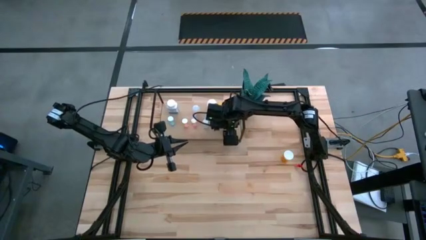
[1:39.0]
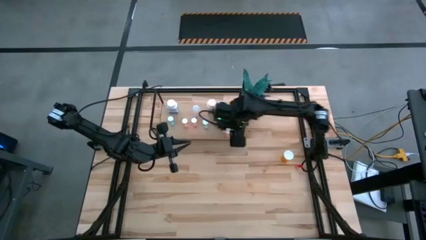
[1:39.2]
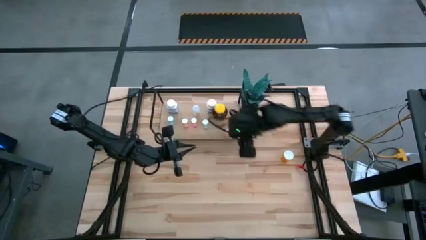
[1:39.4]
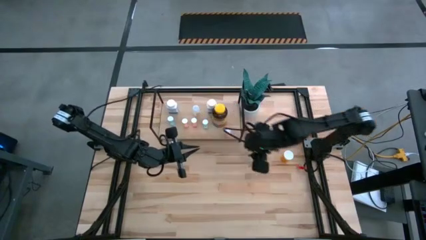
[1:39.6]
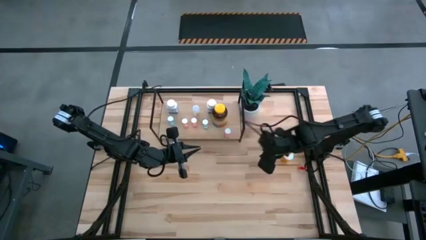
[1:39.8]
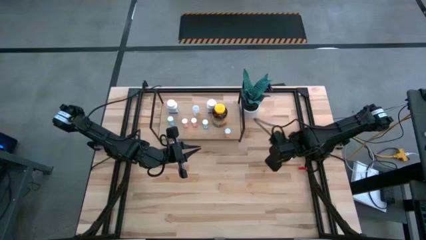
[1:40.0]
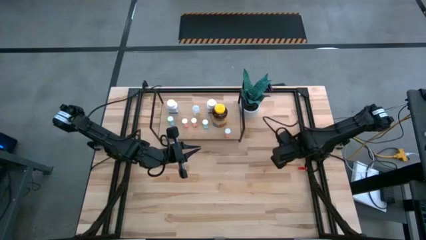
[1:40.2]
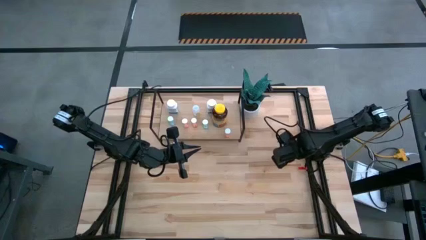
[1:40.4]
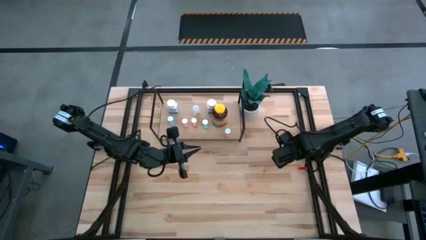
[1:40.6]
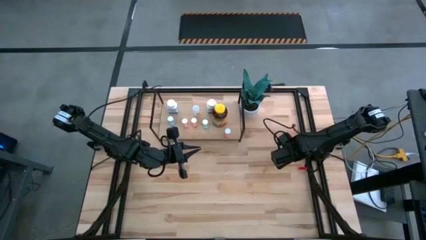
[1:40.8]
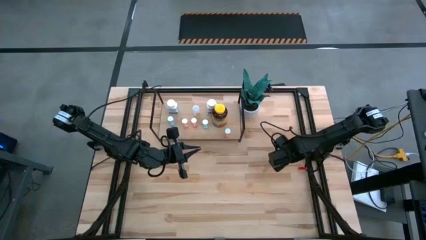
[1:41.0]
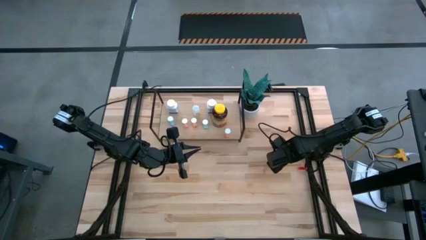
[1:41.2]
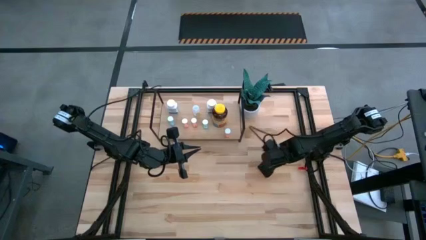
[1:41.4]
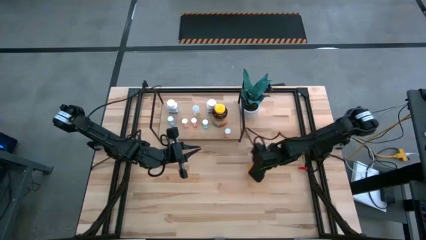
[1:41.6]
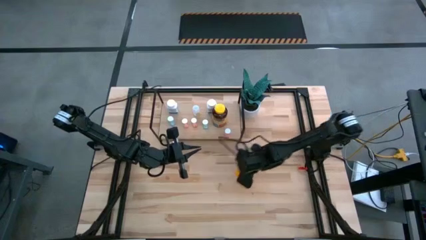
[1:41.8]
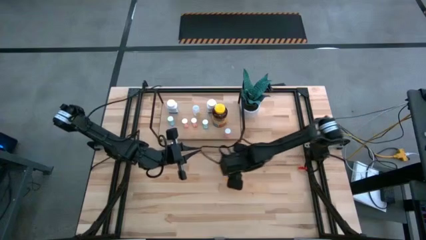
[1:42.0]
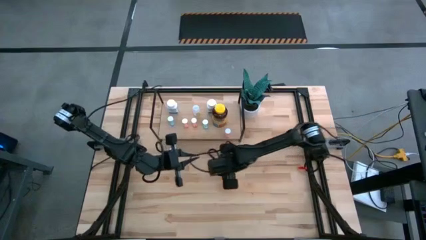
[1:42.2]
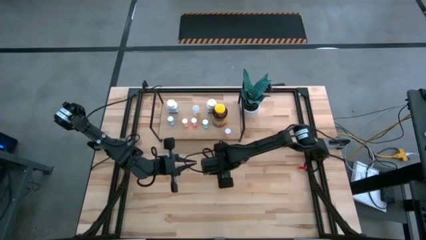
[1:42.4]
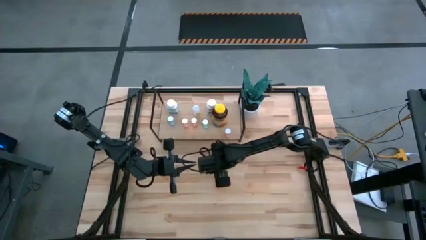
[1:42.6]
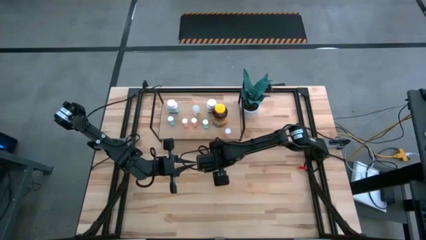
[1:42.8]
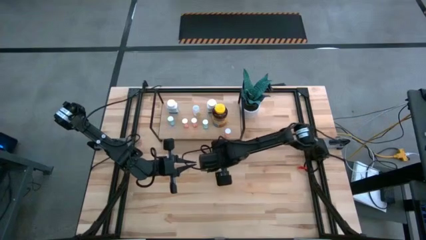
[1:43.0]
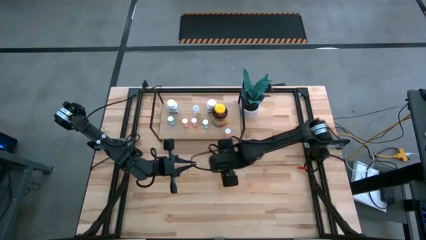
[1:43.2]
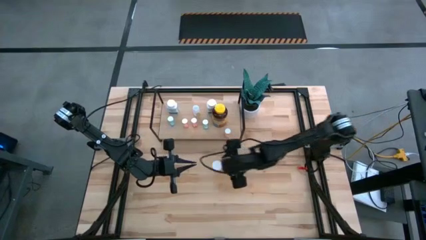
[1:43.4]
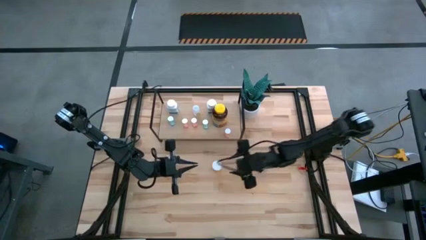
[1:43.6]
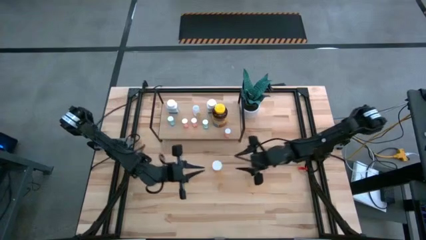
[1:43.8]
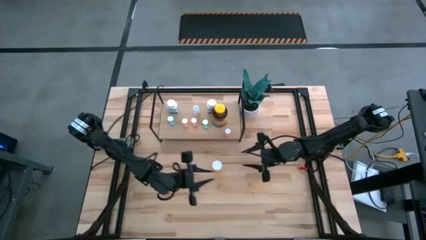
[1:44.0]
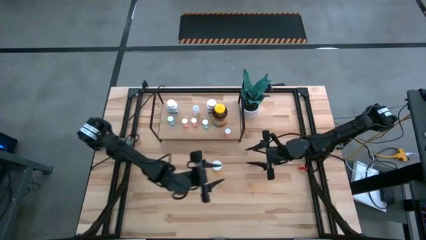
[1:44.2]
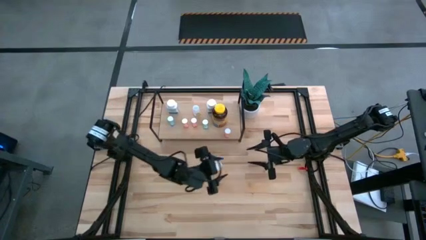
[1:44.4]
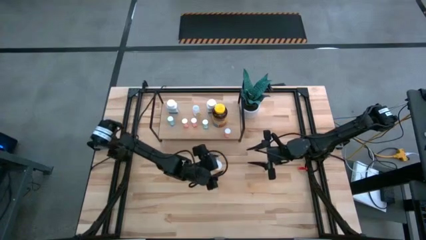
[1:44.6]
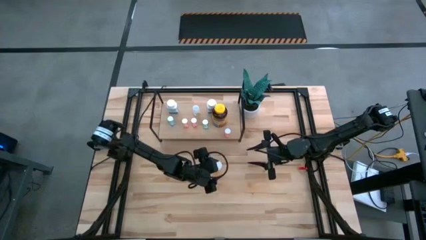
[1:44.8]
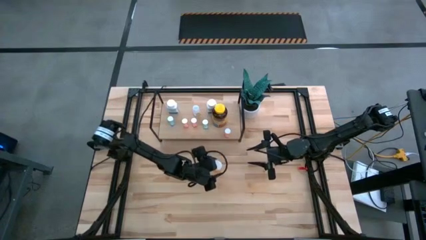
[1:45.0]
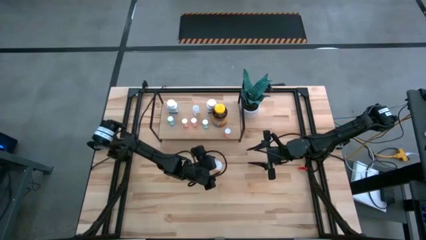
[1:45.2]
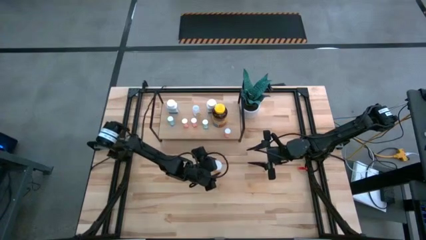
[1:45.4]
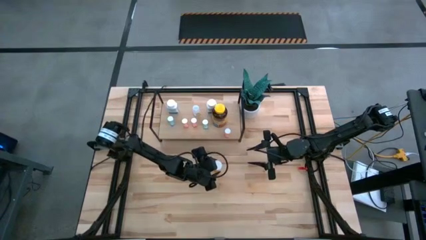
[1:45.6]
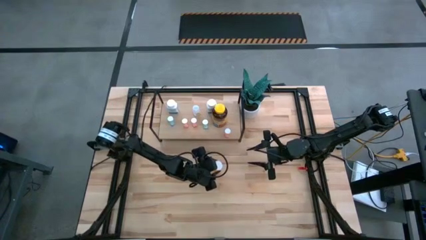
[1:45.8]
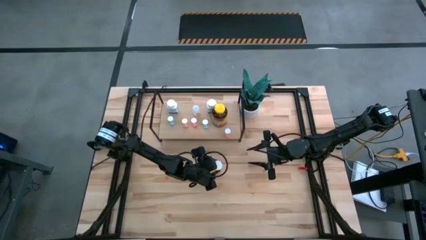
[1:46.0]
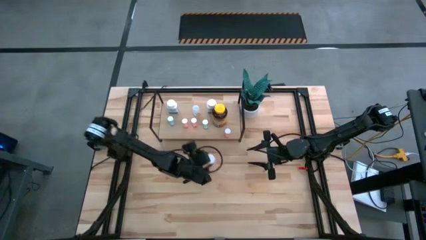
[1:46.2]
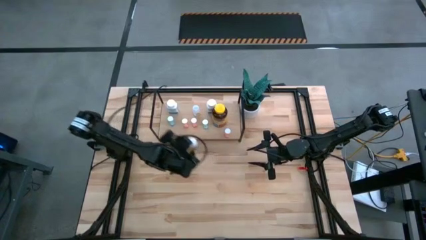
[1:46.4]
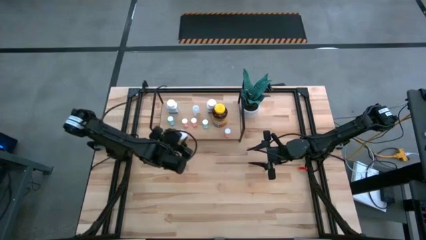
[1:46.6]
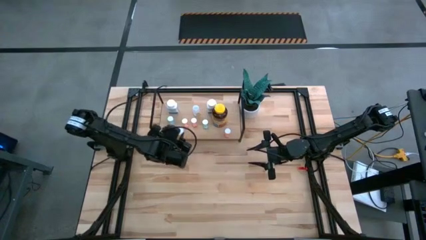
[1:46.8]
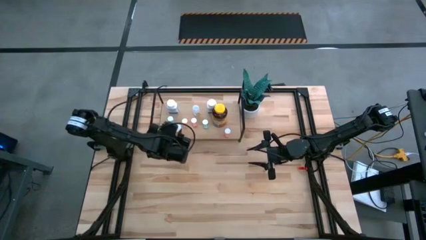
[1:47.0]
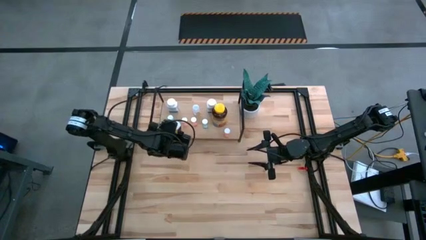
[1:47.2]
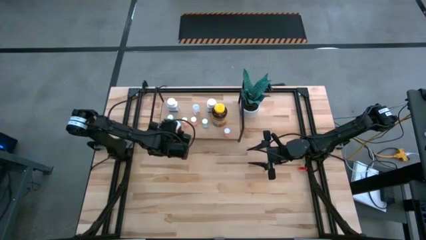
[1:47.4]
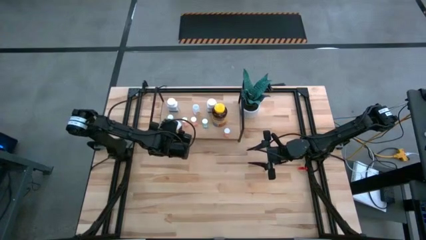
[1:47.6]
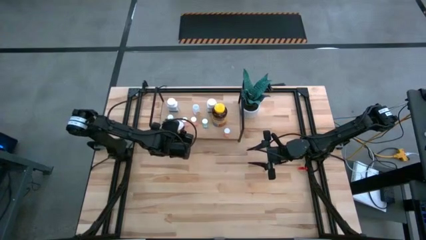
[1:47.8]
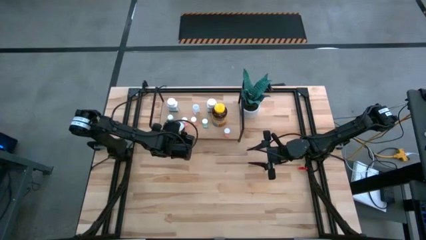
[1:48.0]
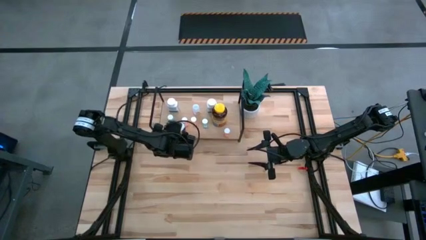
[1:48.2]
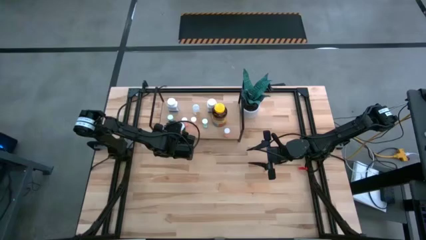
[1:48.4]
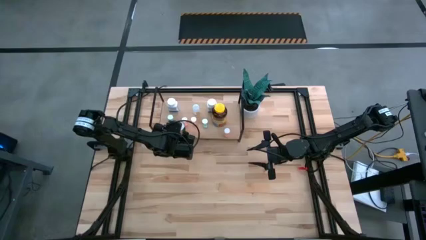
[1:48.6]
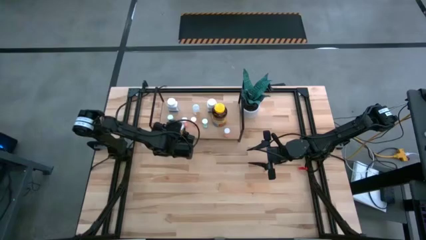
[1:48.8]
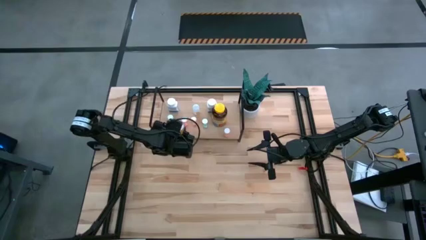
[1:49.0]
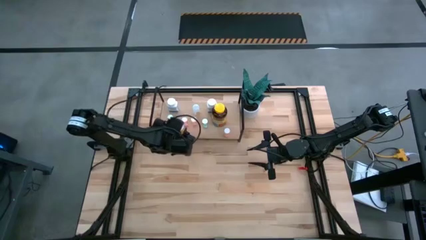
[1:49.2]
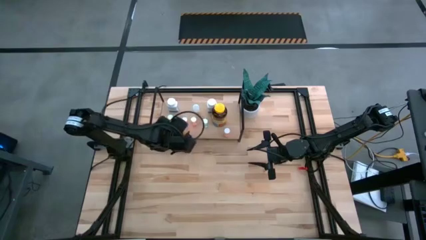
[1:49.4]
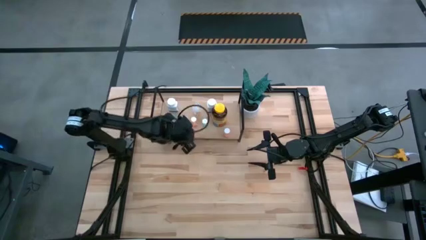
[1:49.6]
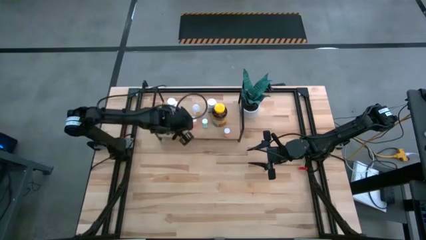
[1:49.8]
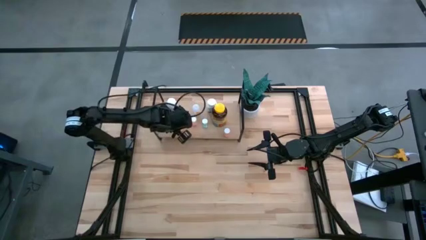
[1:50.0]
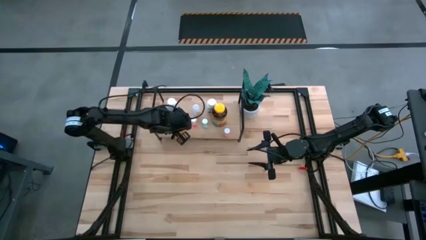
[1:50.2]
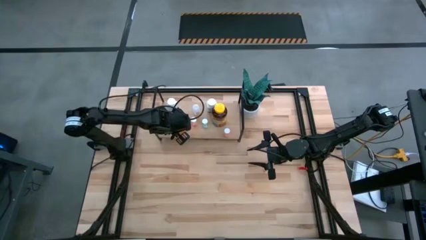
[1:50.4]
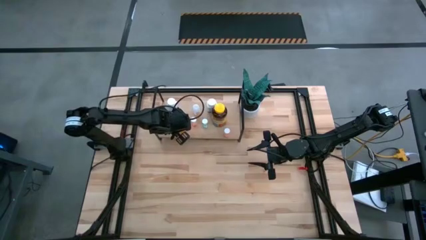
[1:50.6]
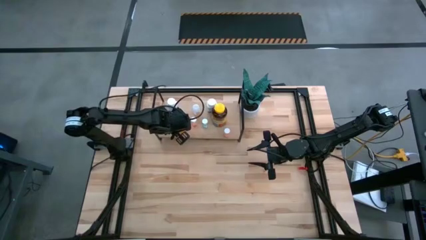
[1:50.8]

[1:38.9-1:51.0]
Task: Pick and place medicine bottles onto shelf by color
Put the orange medicine bottle on the shelf
